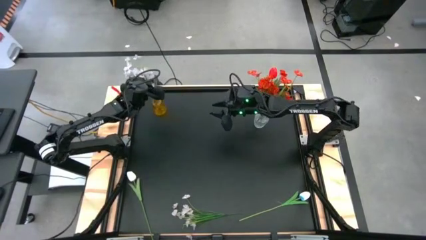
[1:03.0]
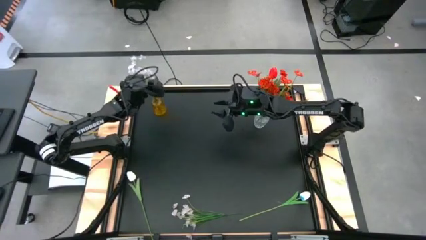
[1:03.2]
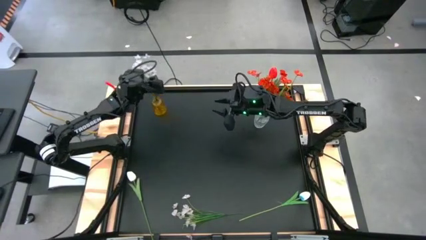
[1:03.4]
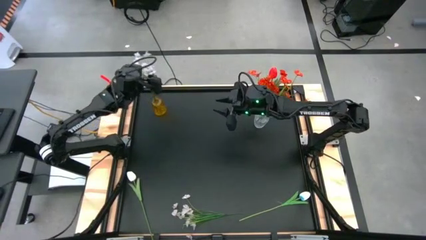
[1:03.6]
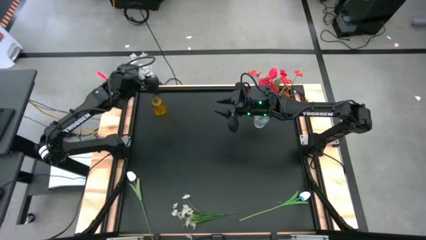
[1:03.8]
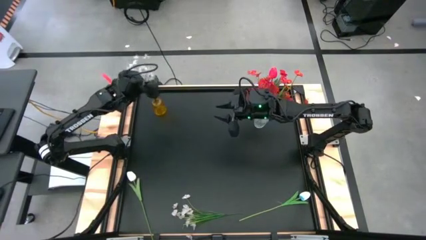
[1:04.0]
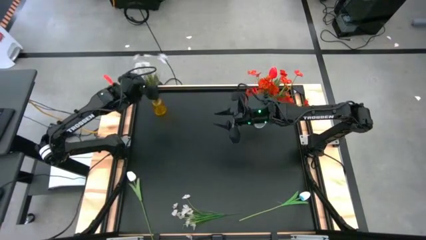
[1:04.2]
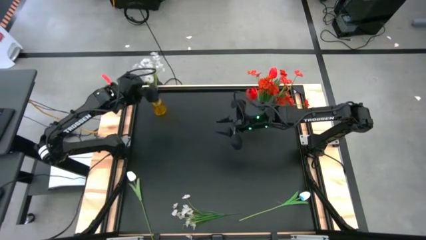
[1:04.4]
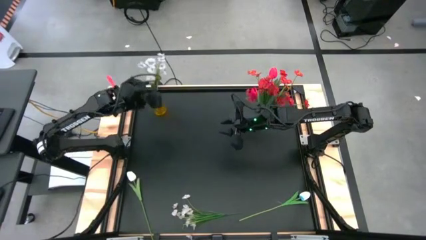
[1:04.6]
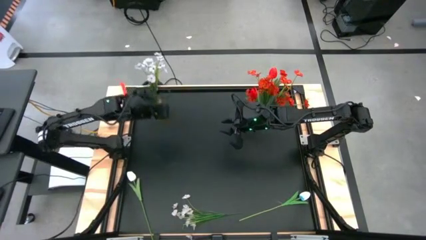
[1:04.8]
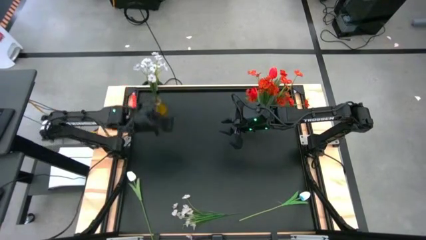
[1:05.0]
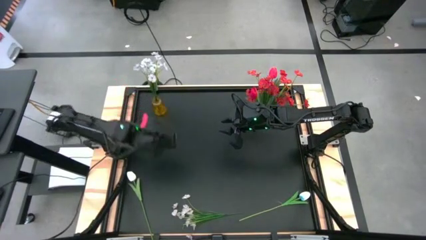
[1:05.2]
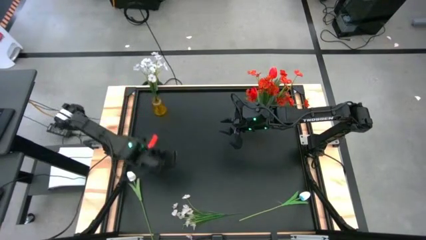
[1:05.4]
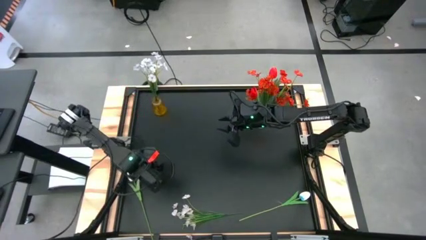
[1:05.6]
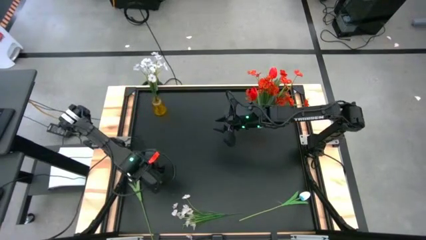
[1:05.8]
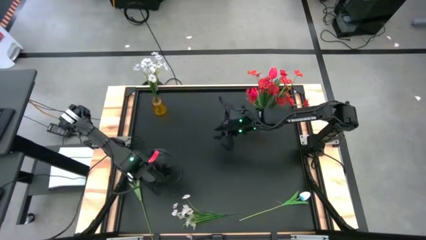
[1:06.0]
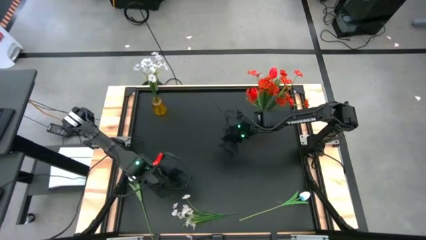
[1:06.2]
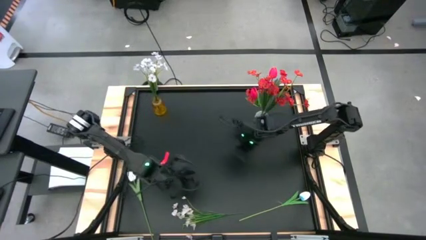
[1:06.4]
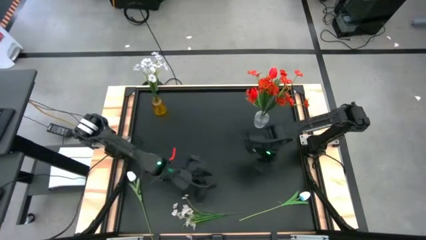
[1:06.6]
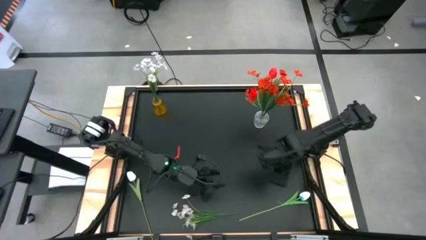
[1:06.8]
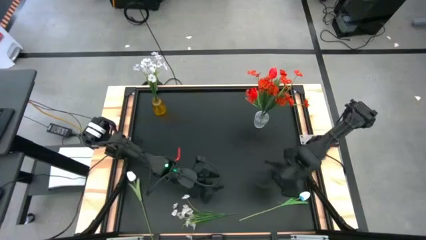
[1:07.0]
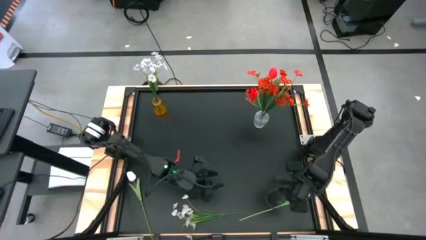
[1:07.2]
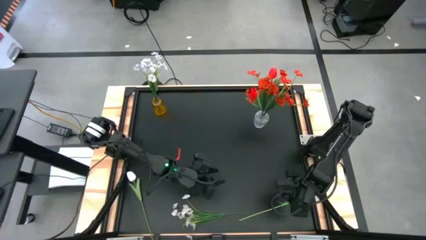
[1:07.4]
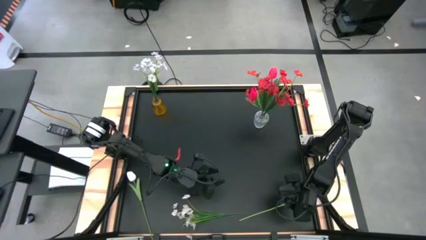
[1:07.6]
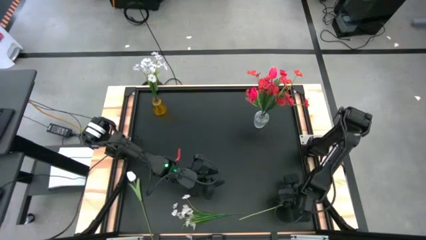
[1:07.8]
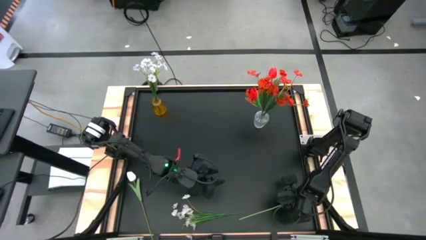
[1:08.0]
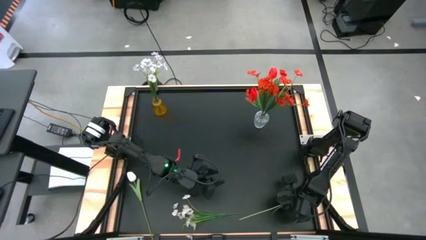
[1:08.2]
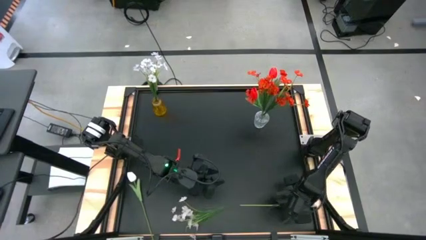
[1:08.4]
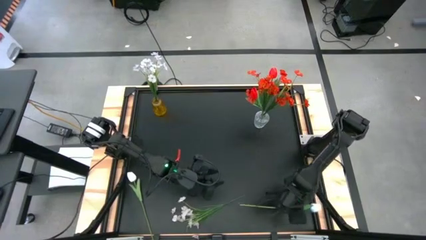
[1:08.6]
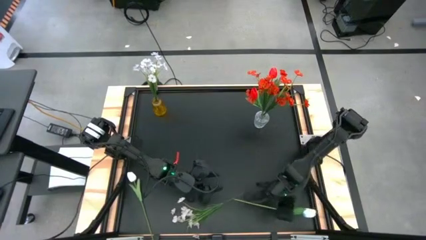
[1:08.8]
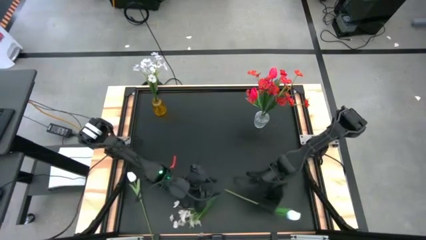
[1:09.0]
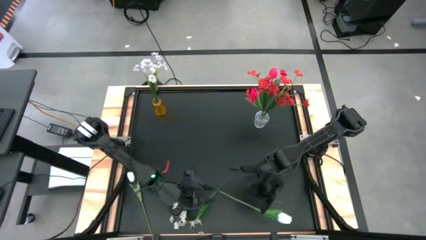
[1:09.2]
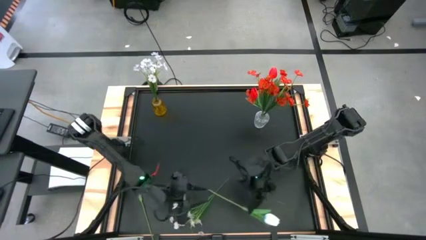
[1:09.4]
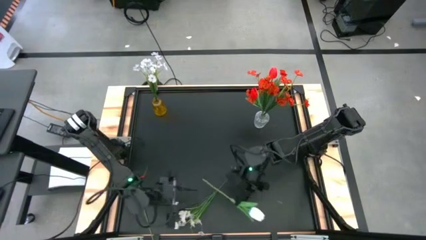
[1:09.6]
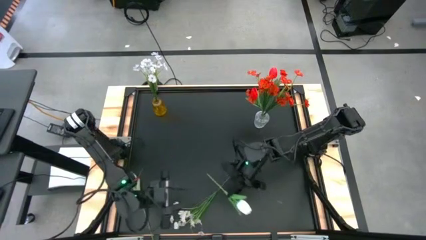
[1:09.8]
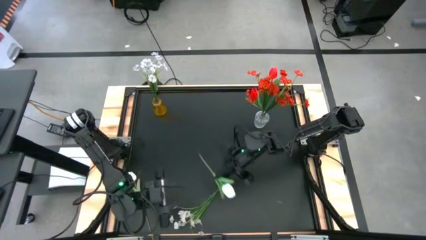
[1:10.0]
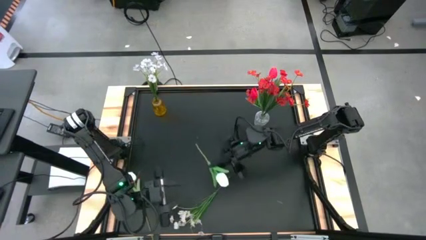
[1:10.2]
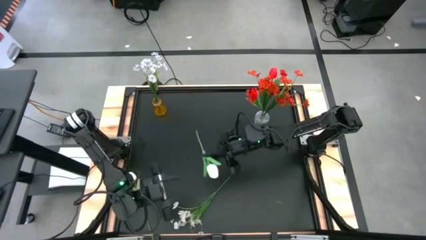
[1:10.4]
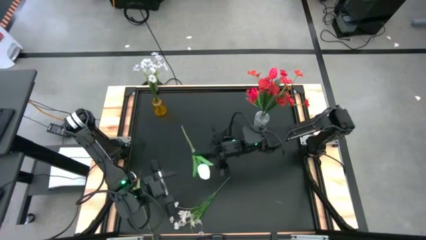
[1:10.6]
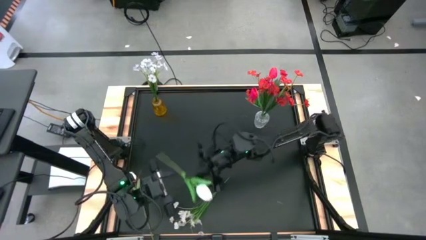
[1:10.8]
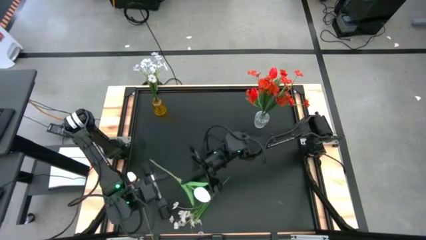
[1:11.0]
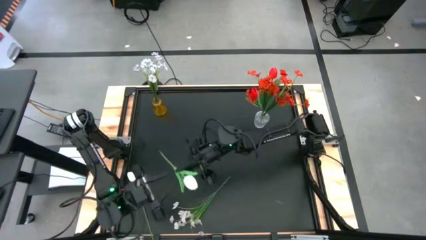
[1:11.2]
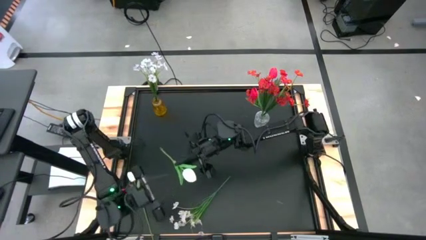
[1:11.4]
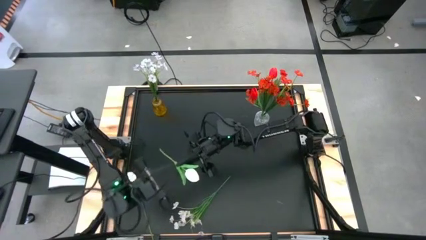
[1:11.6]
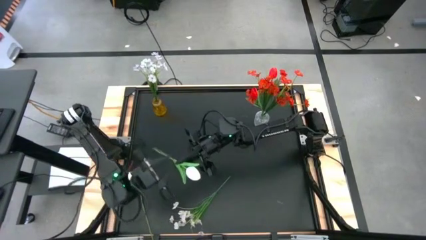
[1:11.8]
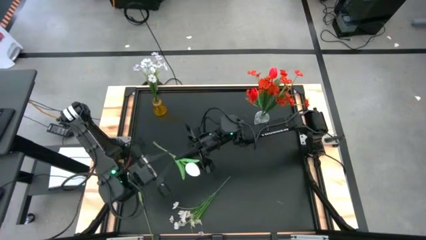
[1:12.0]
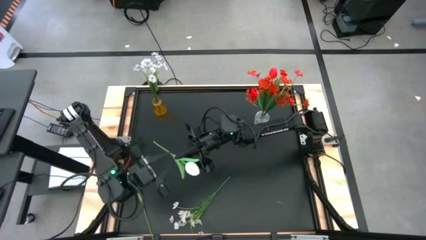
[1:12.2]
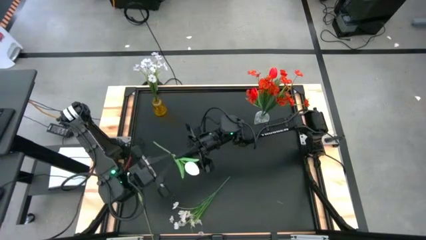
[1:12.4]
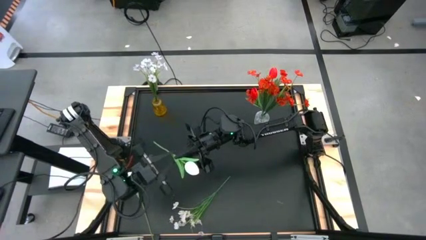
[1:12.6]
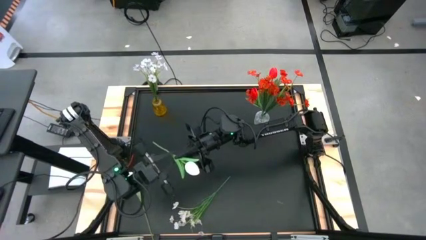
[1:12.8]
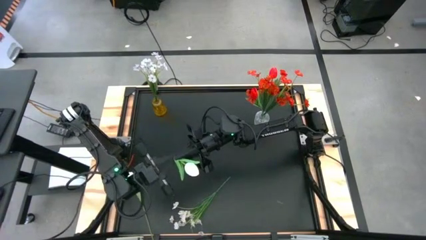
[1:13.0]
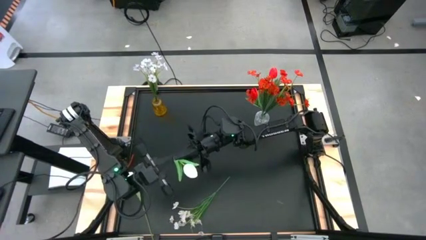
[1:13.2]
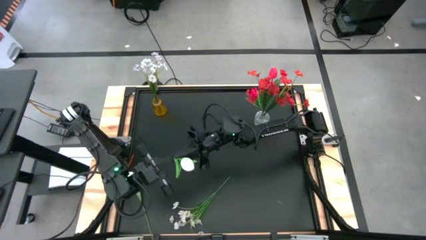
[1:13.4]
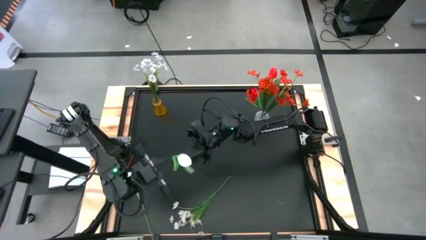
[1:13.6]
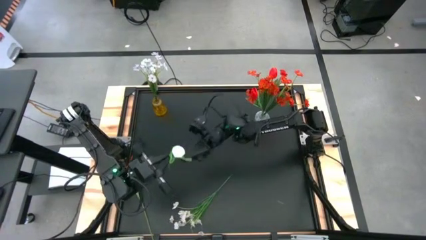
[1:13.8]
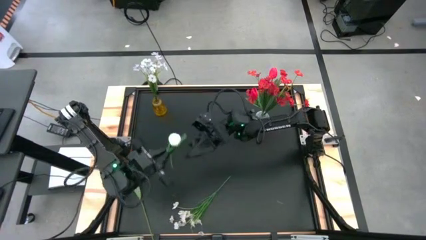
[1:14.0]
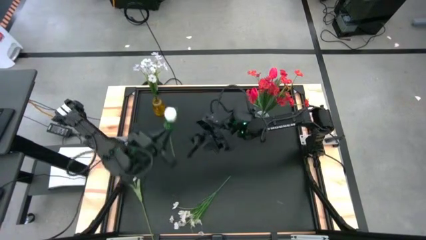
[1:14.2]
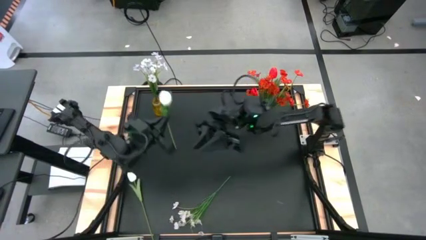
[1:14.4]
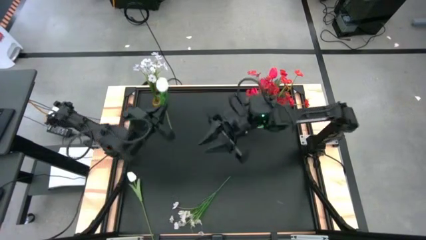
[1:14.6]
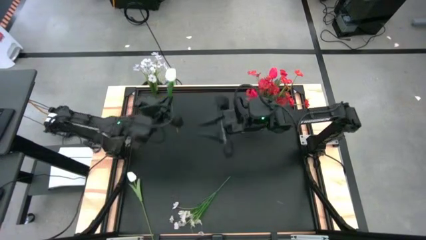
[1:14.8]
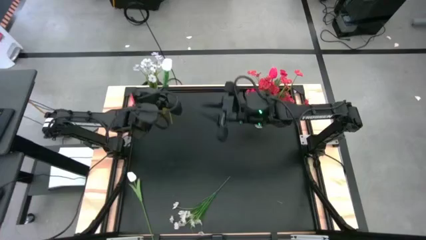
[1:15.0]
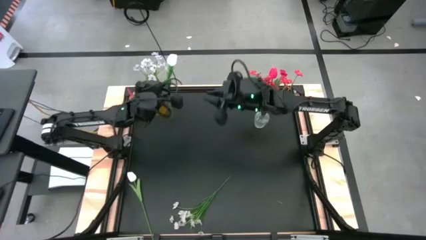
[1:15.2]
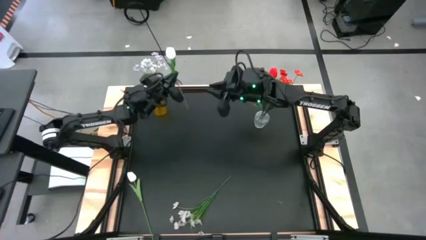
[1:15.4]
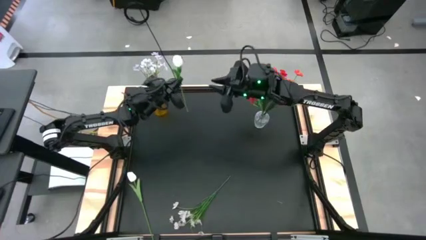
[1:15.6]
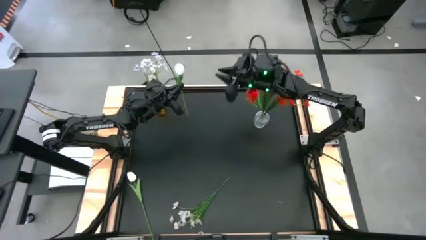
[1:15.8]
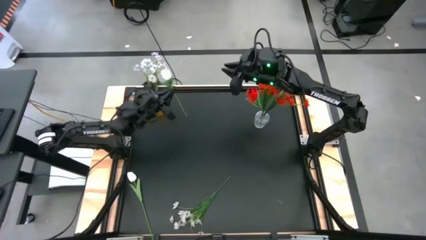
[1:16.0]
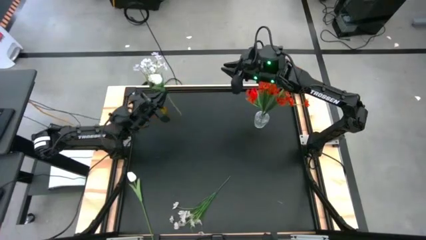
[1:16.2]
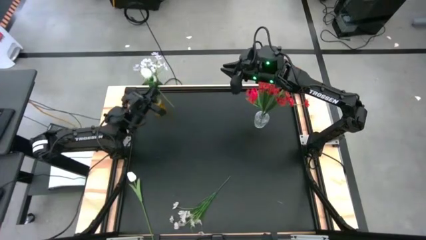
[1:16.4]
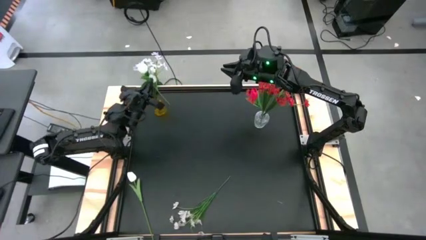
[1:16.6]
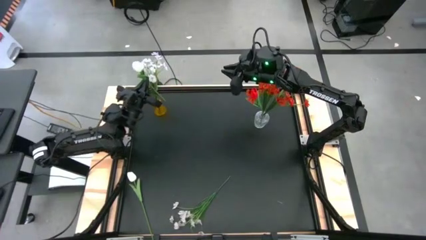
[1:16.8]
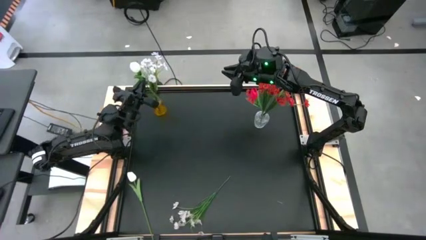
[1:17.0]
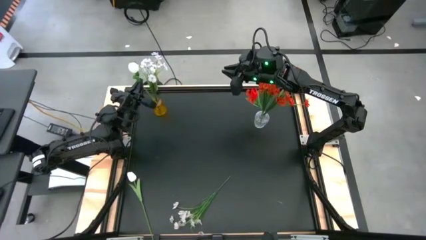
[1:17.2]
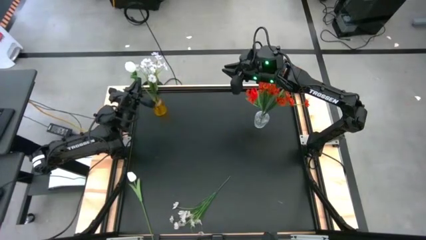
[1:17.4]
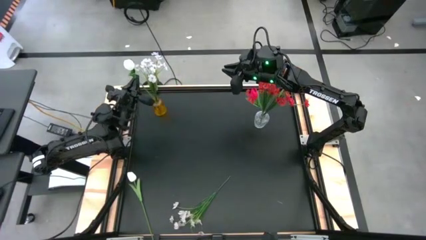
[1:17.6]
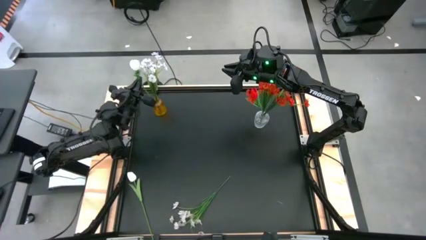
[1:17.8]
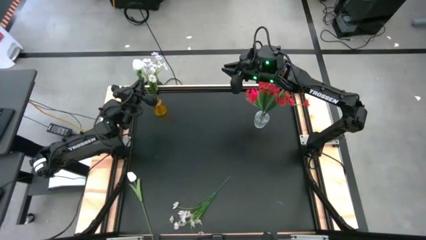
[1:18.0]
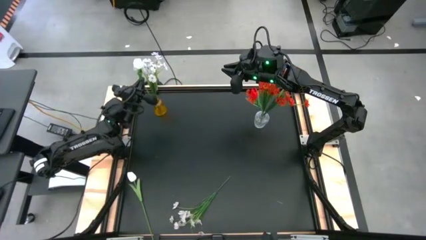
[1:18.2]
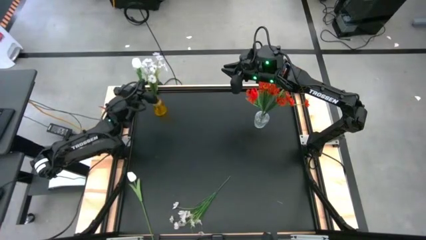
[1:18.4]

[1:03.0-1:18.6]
Task: Sort flowers into vase by color
Put the right white flower into the yellow vase

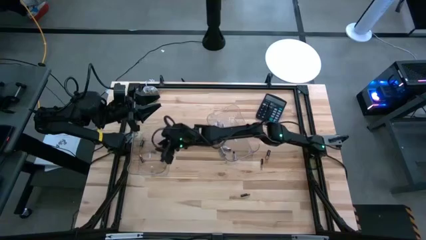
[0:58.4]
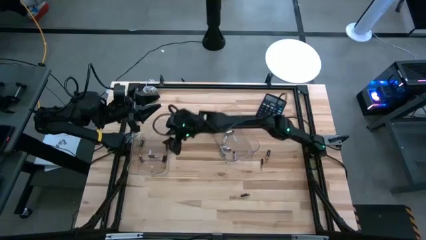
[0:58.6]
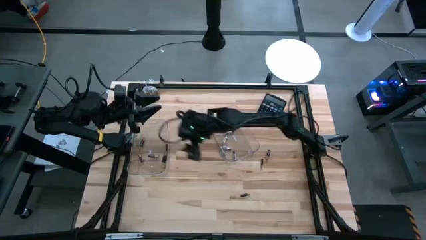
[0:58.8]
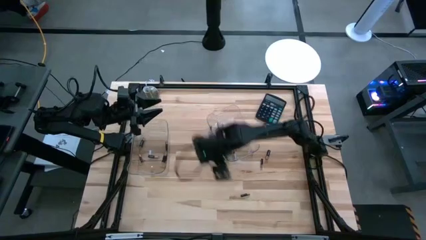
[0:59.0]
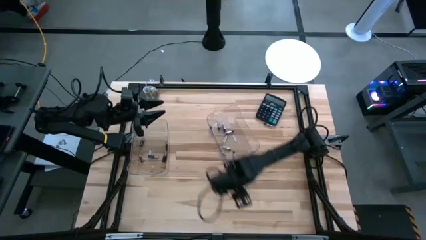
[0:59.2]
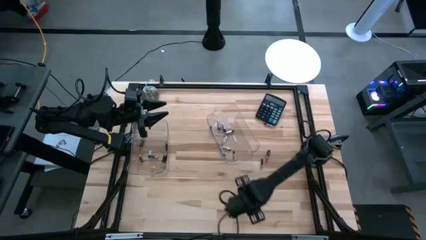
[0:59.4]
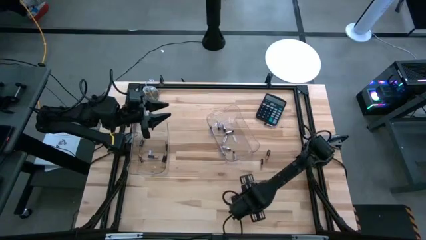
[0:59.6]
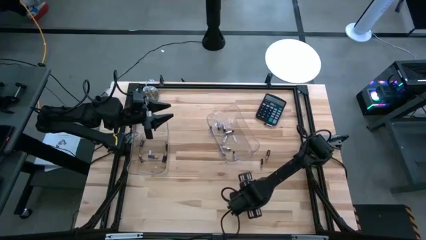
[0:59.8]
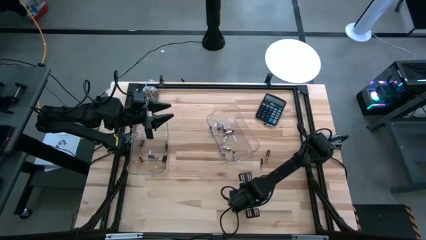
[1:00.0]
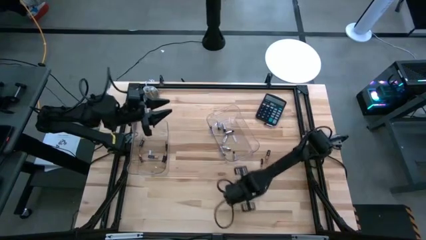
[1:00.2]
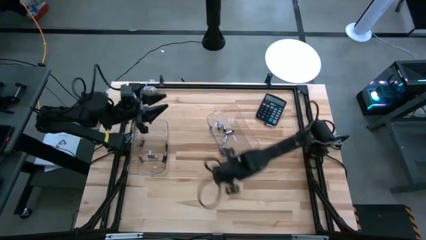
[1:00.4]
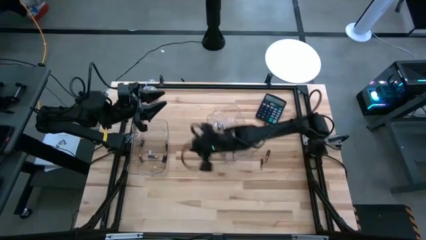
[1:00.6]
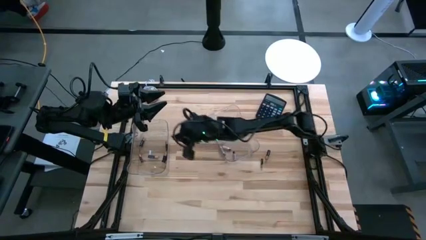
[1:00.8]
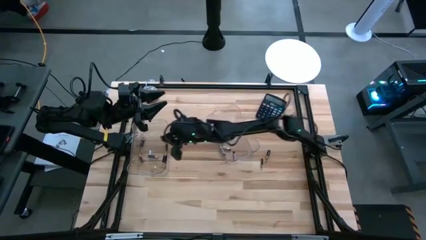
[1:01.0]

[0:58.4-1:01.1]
Task: Sort batteries
Put the black battery into the left transparent bin
